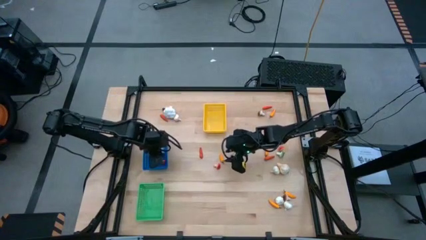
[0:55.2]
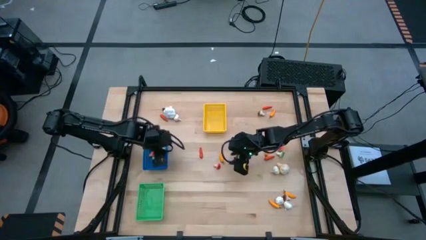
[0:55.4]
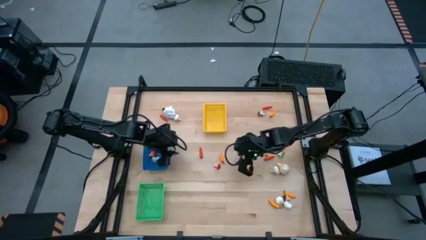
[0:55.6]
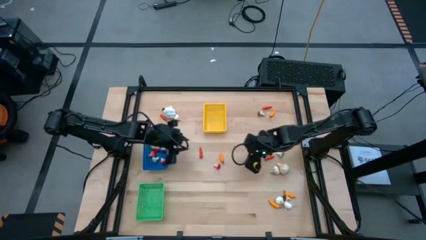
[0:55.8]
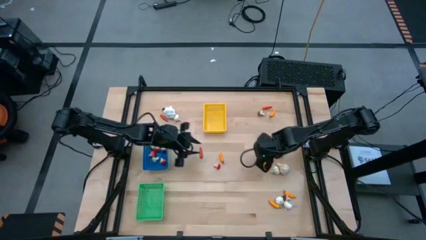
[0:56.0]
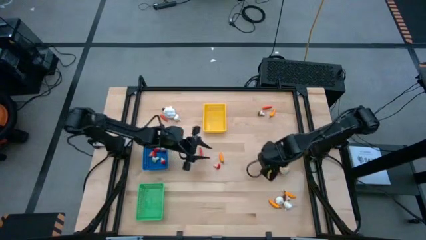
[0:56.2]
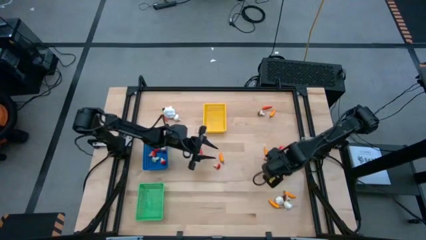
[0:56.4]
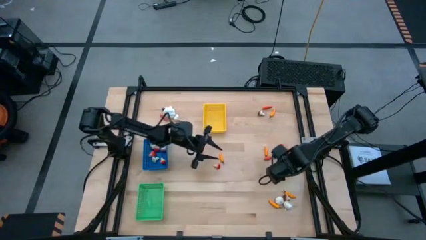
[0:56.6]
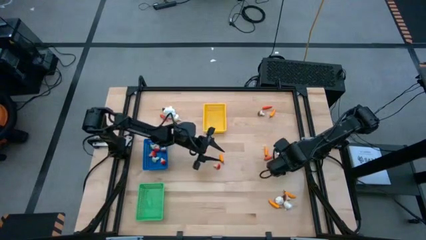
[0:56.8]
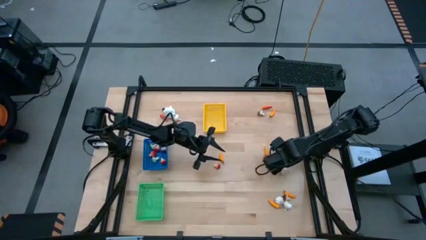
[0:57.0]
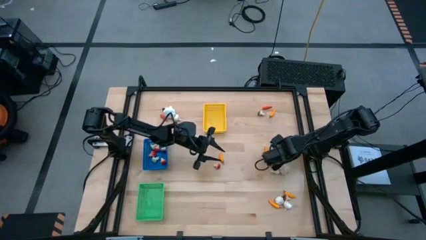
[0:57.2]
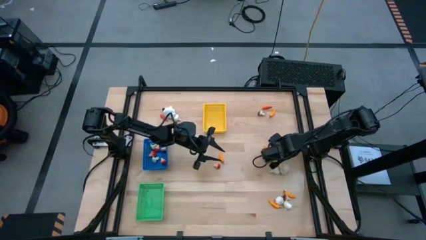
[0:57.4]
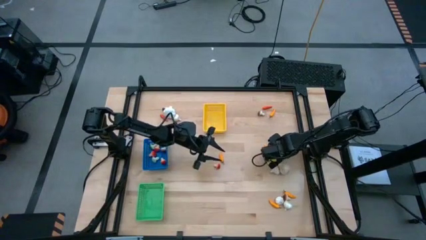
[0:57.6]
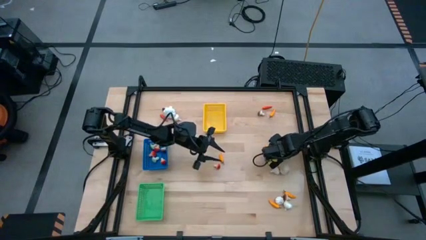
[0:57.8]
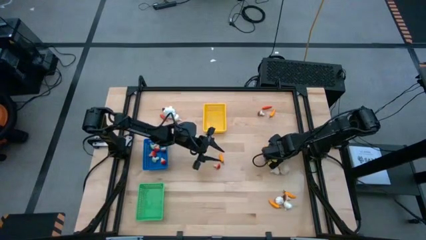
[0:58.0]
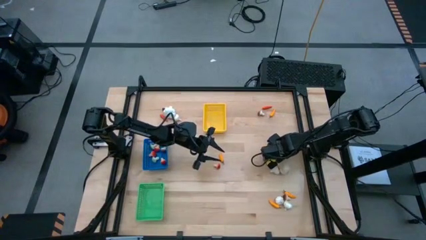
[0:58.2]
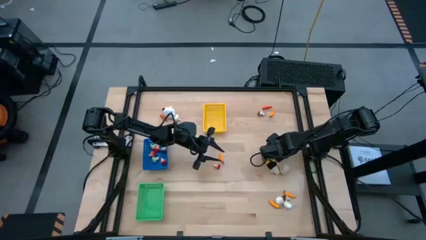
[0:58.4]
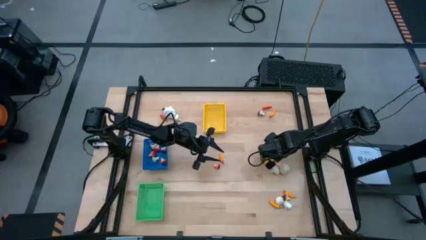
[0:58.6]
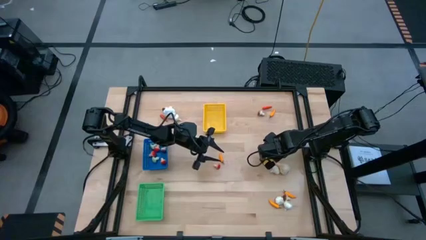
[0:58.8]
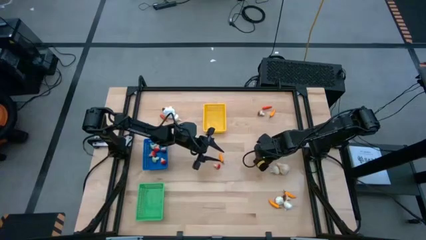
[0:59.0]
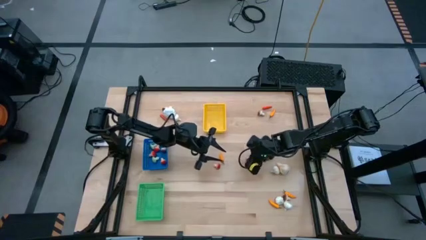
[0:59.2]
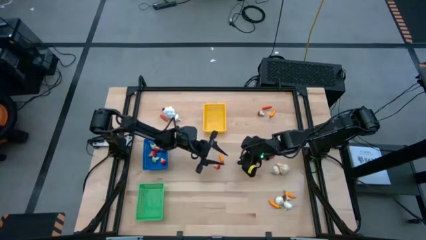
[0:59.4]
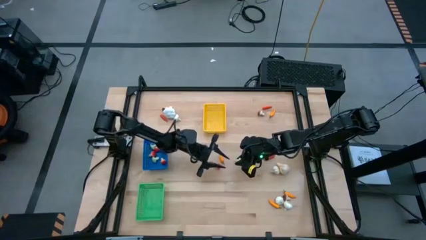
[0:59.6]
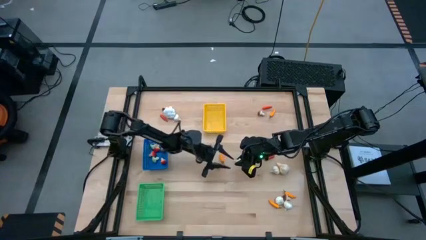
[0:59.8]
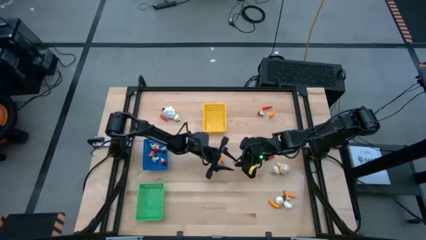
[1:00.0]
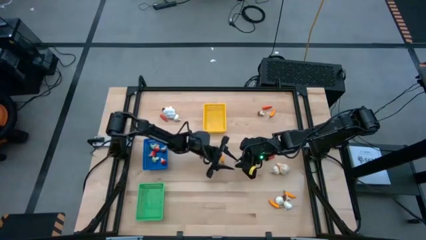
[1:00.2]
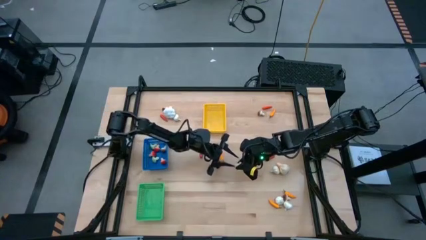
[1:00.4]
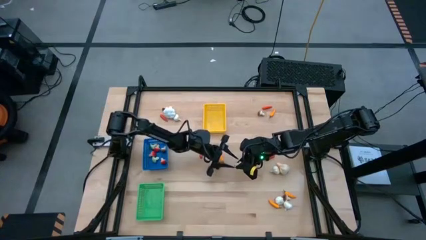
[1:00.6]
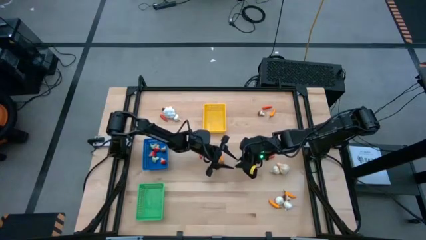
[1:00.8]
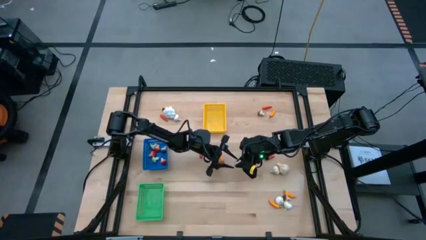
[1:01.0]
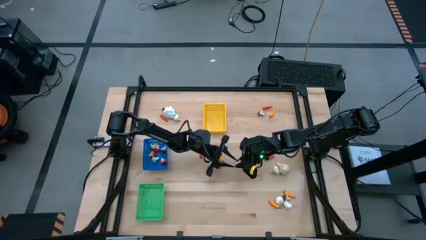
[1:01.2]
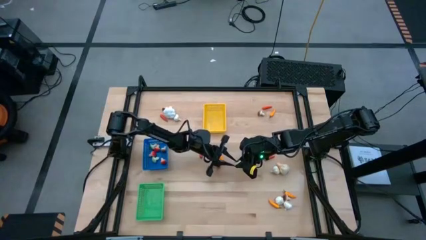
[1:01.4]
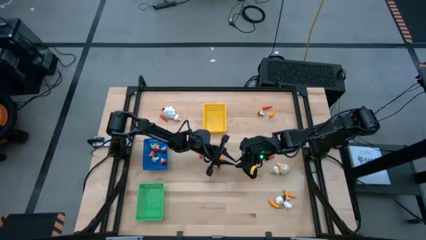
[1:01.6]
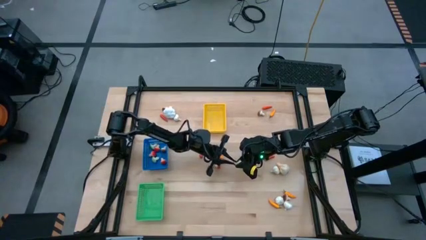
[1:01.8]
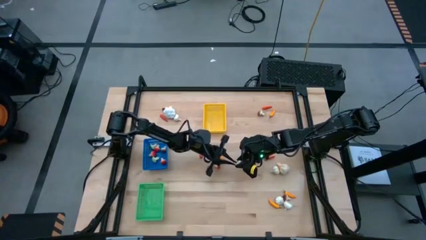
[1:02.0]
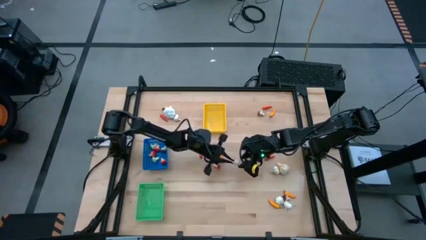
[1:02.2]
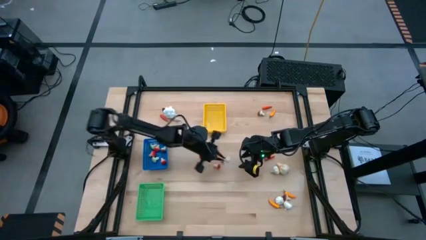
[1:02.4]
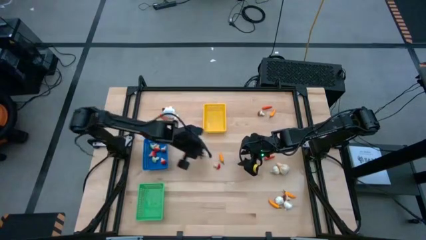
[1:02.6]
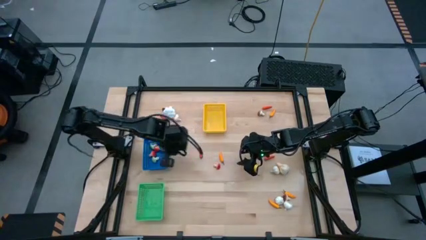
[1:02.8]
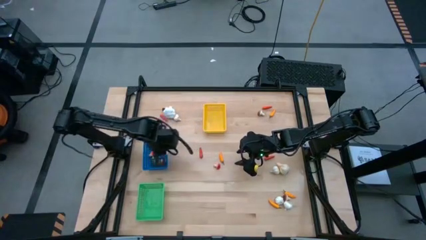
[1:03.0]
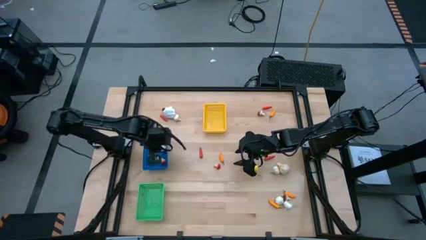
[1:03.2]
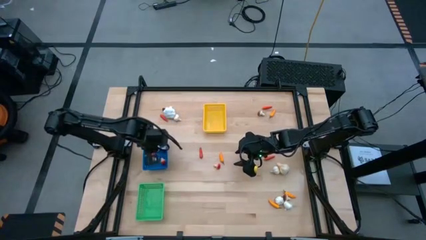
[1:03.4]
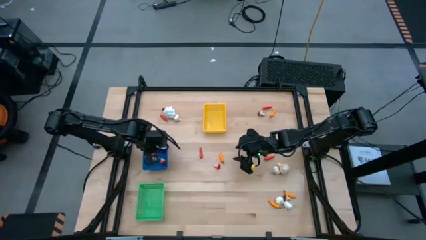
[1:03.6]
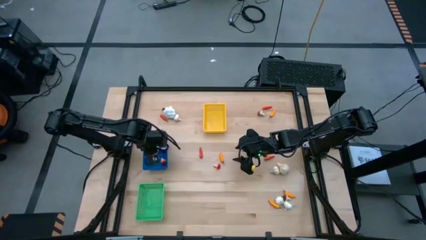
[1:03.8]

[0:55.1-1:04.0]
Task: Sort produce into baskets
Put the green mushroom into the blue bin

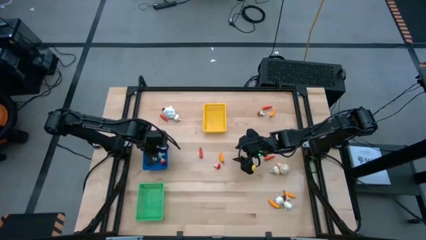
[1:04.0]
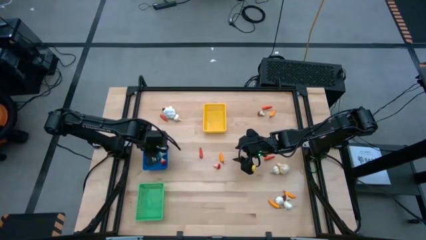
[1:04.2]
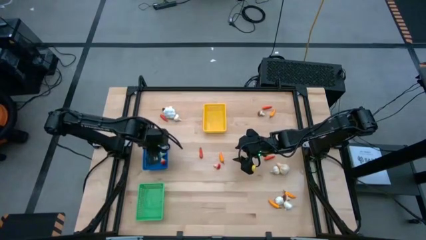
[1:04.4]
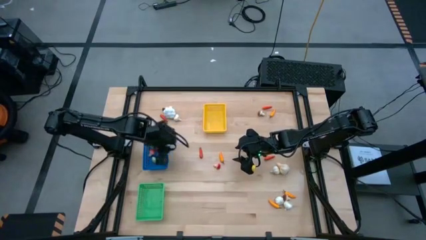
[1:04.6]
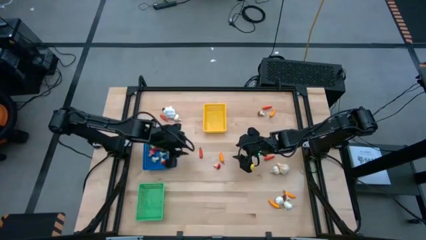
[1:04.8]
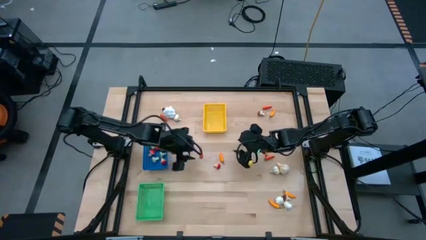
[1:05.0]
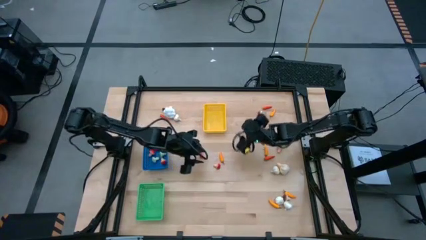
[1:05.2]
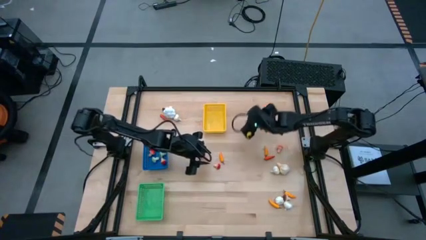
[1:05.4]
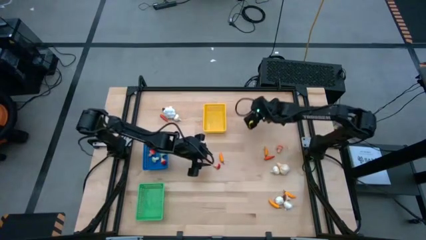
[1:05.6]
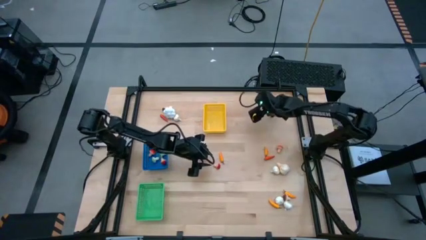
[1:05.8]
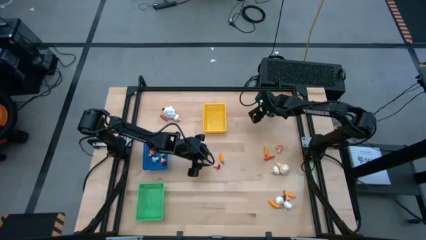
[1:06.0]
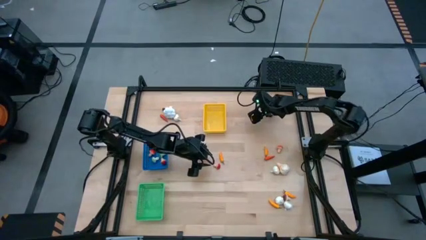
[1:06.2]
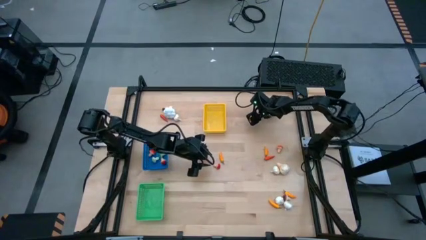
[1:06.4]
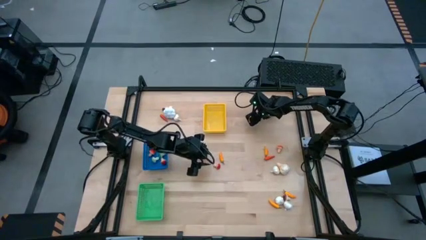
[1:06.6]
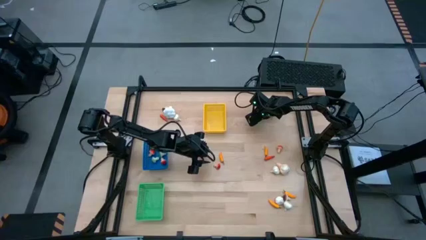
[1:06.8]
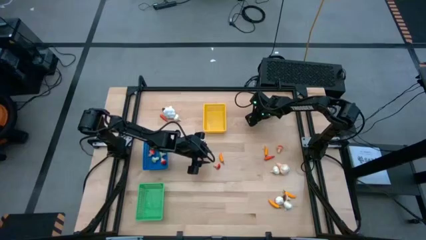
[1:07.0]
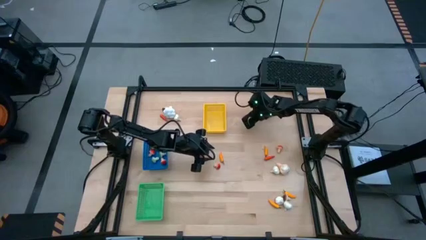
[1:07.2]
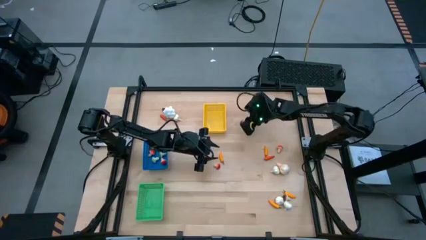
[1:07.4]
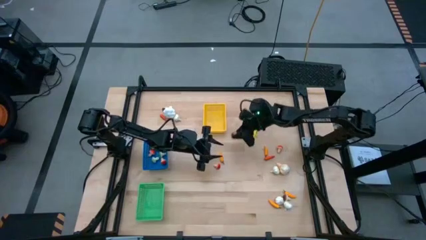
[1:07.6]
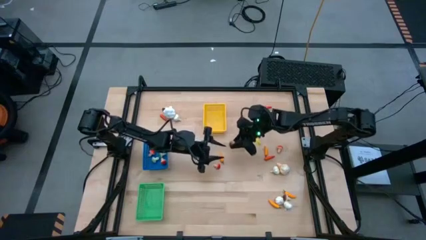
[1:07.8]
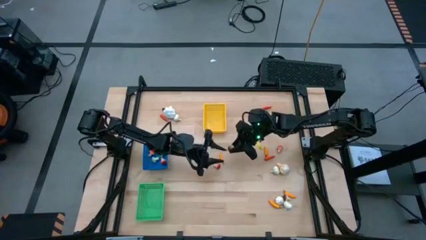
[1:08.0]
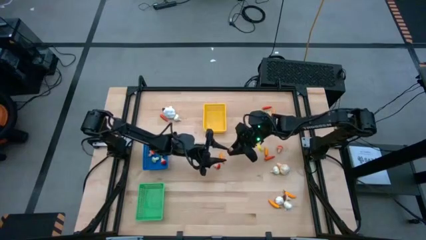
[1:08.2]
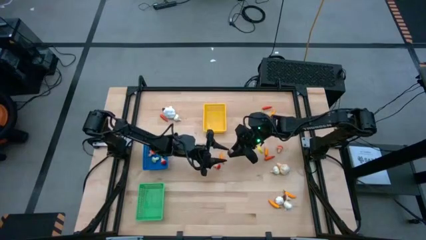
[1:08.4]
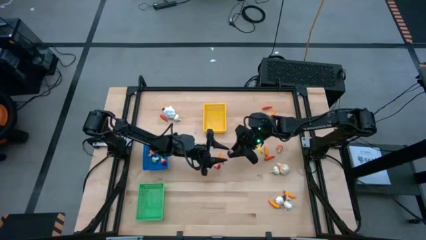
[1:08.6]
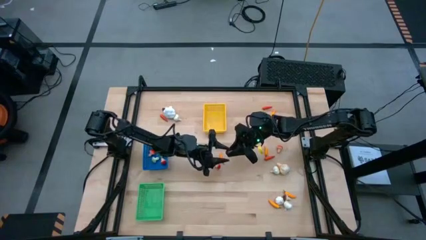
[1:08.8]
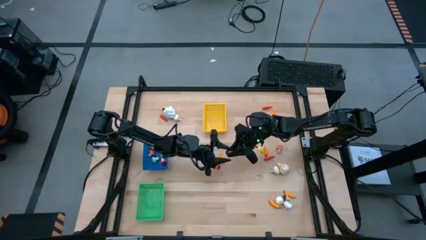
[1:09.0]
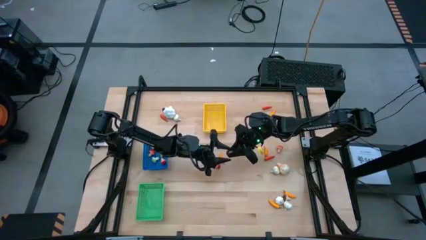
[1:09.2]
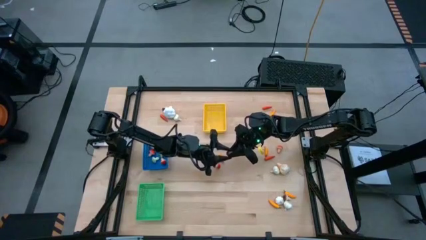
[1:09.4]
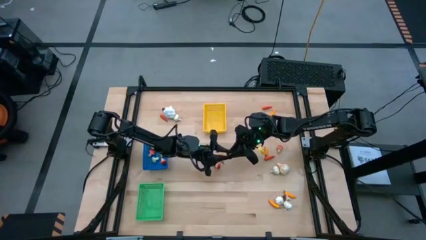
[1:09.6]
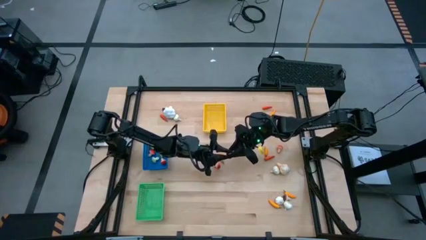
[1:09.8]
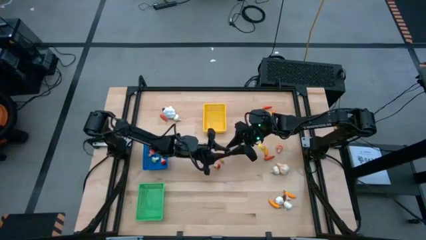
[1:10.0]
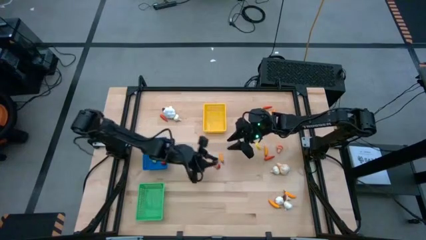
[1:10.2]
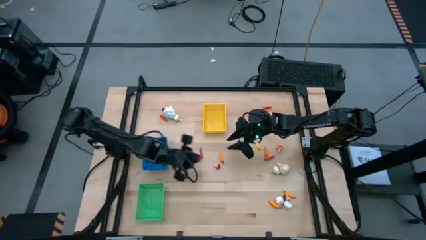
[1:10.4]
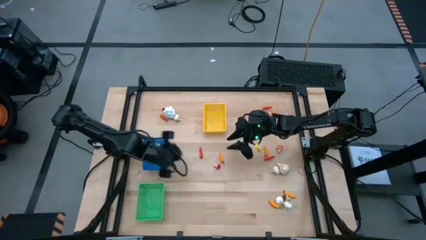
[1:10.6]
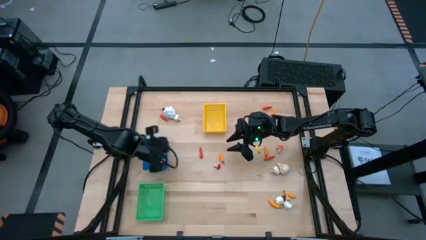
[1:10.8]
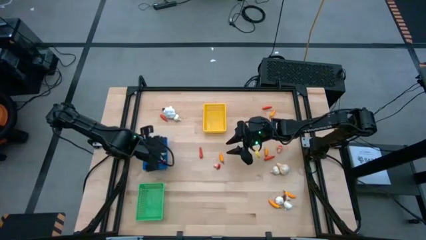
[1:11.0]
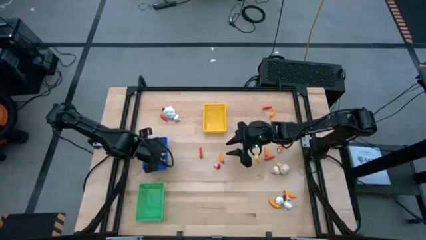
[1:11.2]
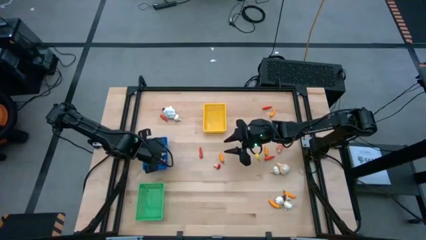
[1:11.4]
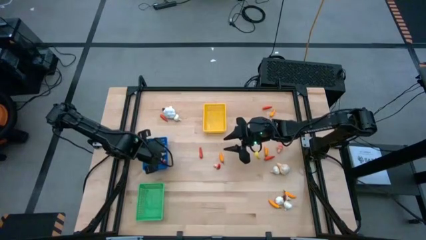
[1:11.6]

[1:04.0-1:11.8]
Put the brown mushroom into the blue bin
